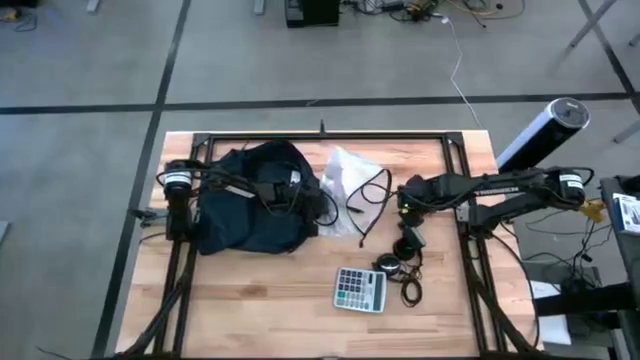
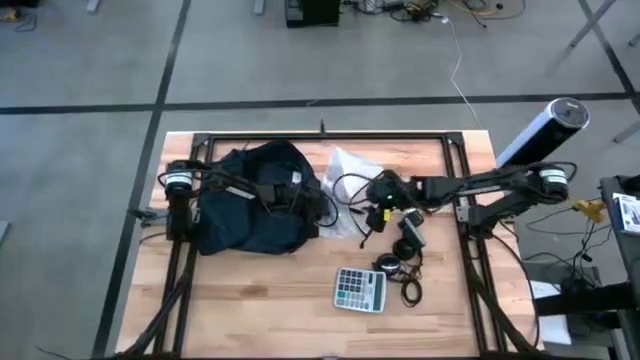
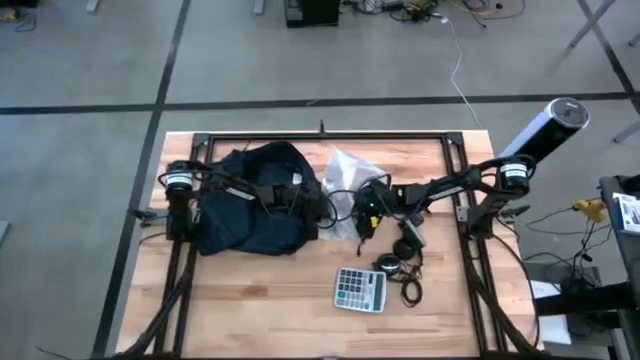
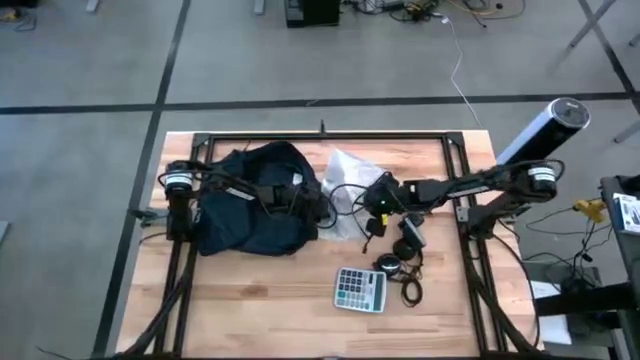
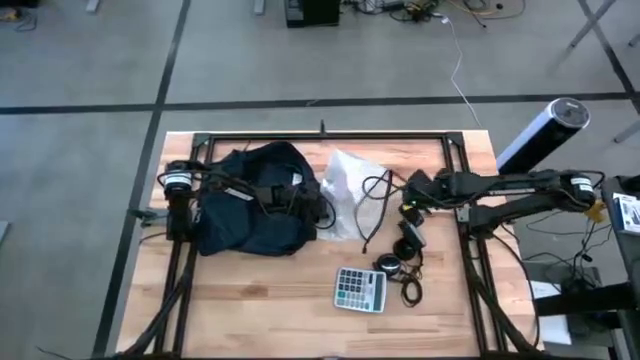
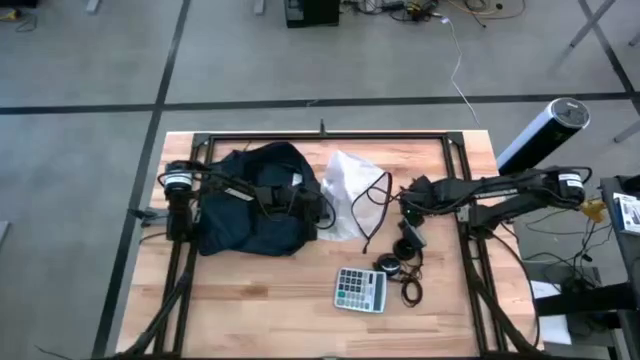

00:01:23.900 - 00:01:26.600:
Task: Unpack backpack
Remove the black pen from the white zipper pouch

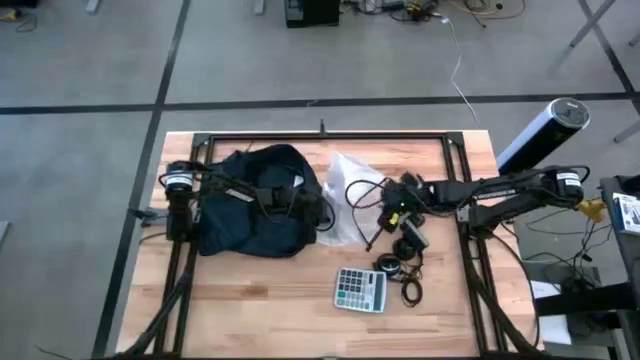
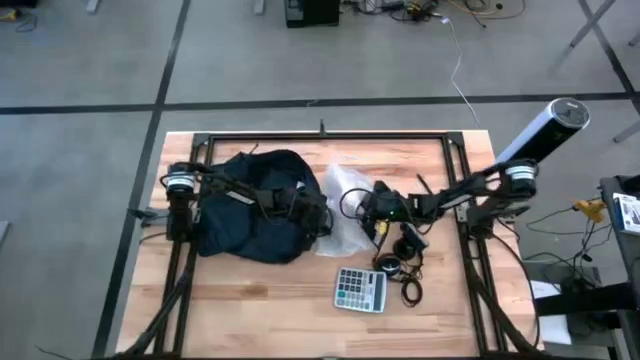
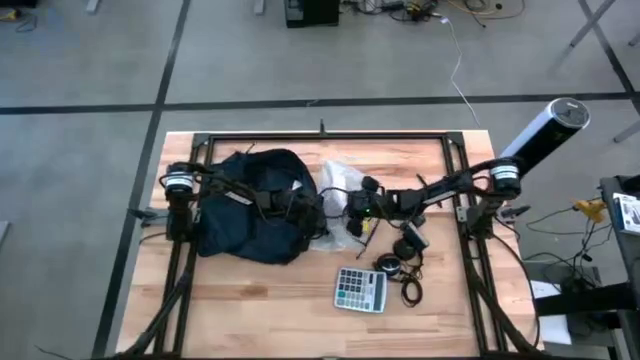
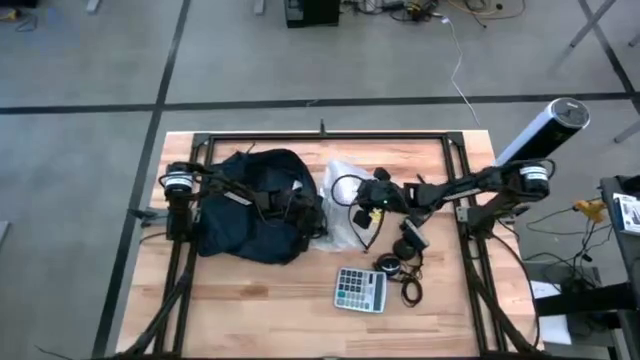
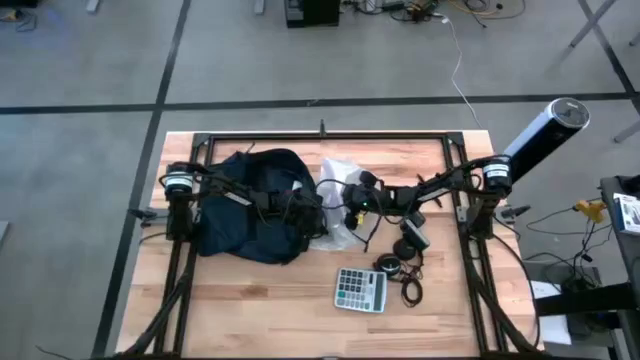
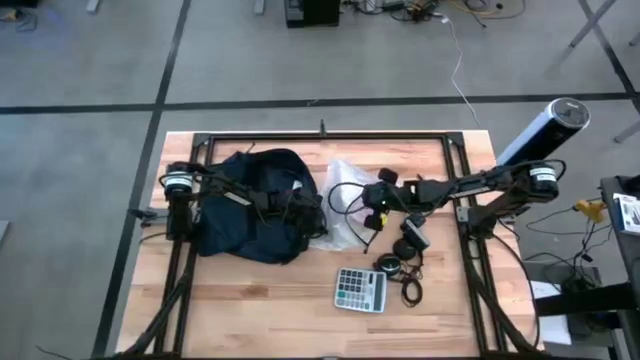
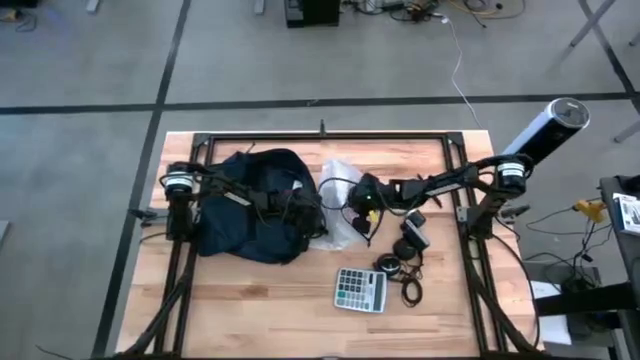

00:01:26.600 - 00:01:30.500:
Remove the red tuck box from the white zipper pouch

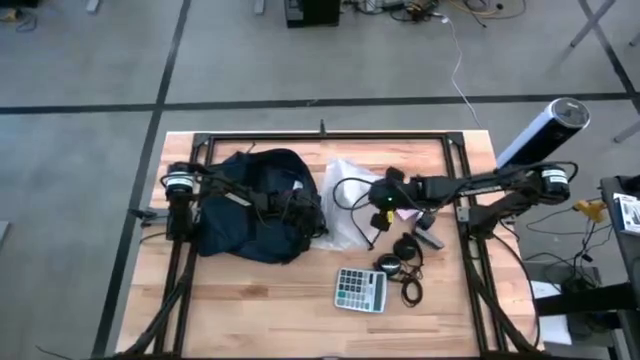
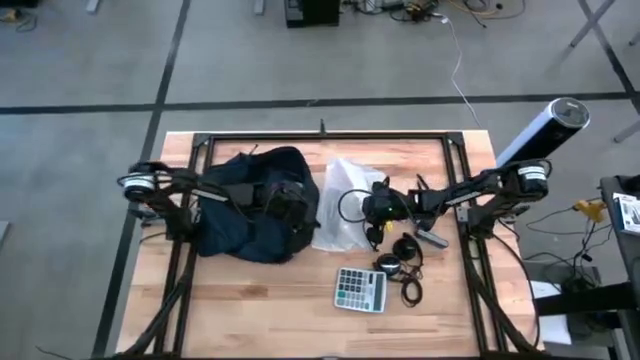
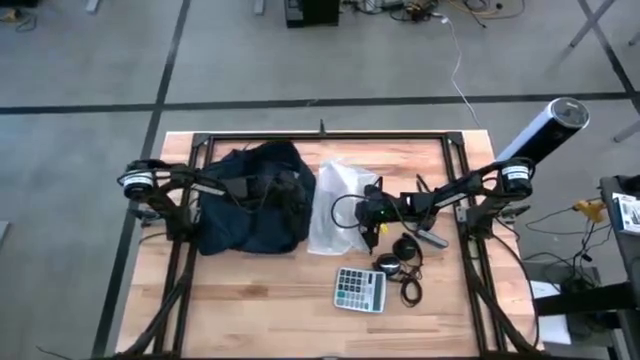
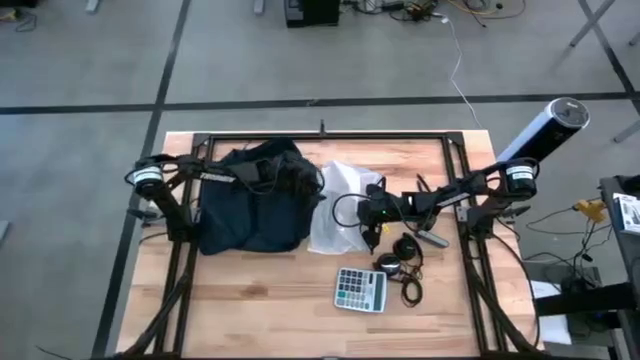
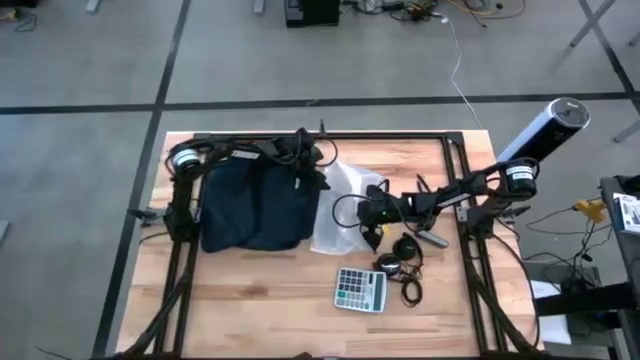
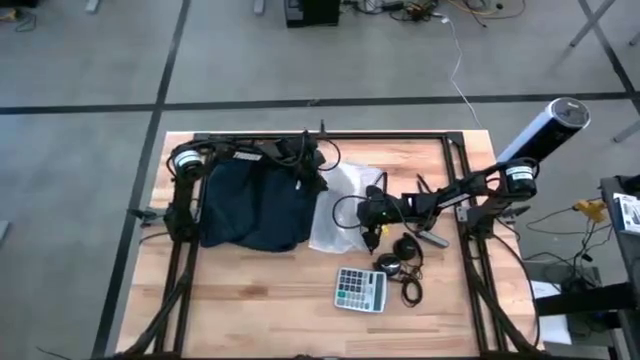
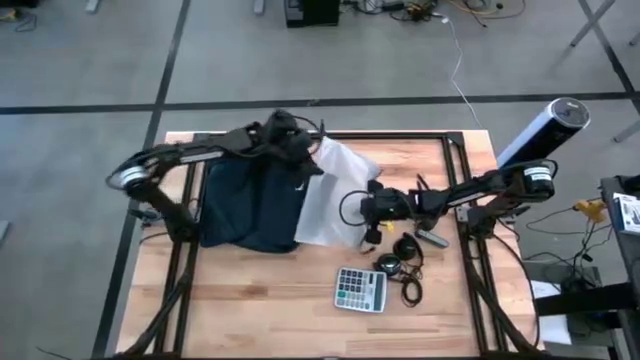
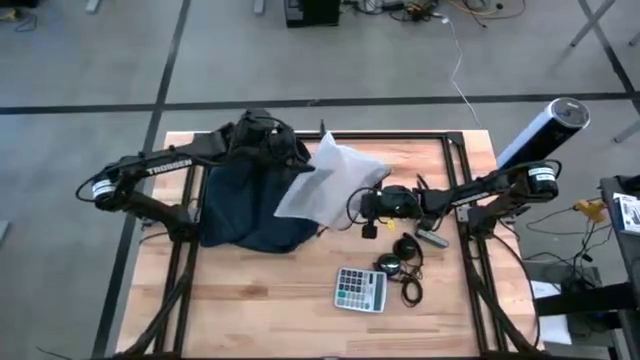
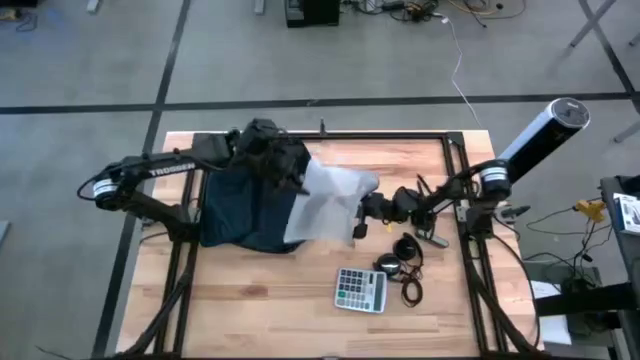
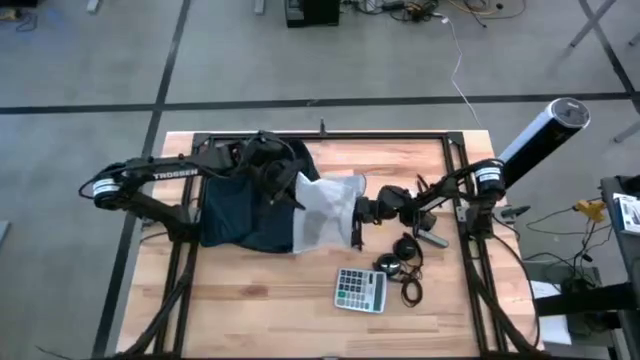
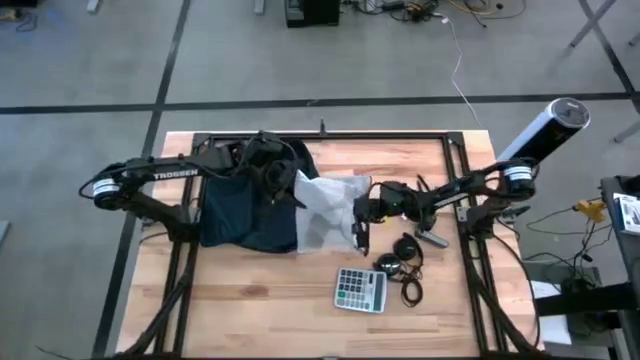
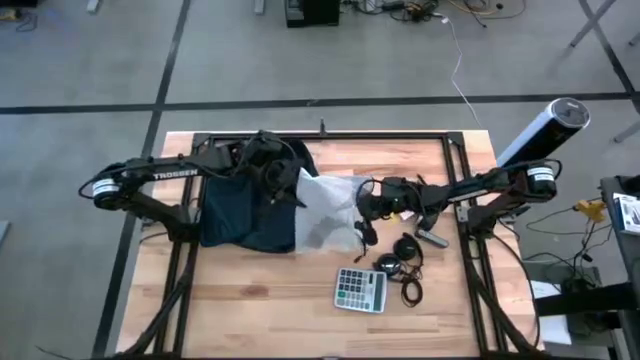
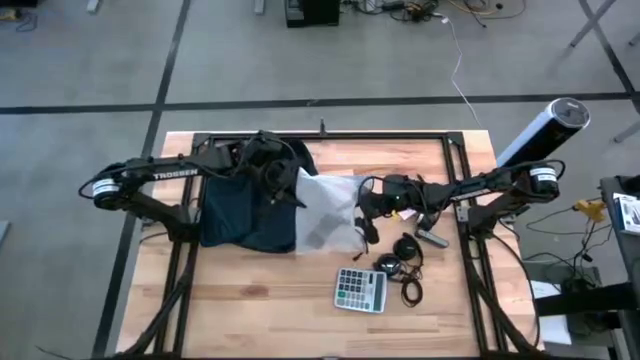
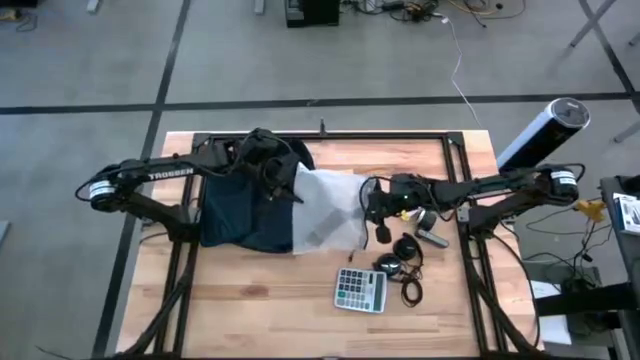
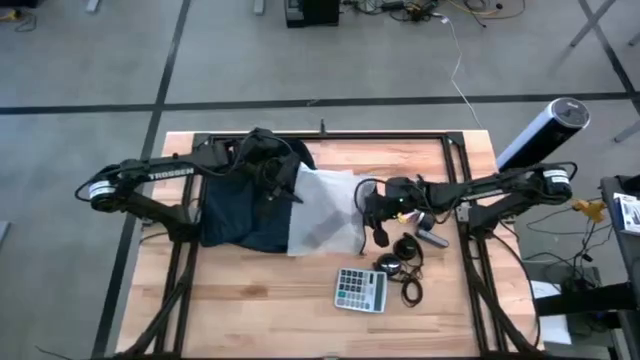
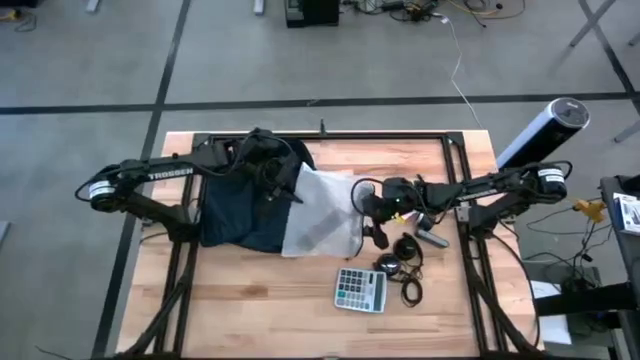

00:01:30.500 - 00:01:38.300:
Remove the black paper from the white zipper pouch

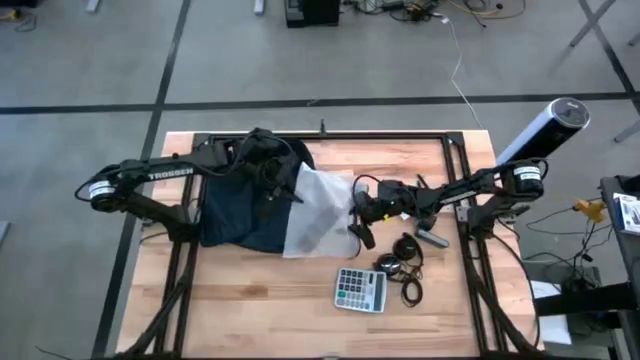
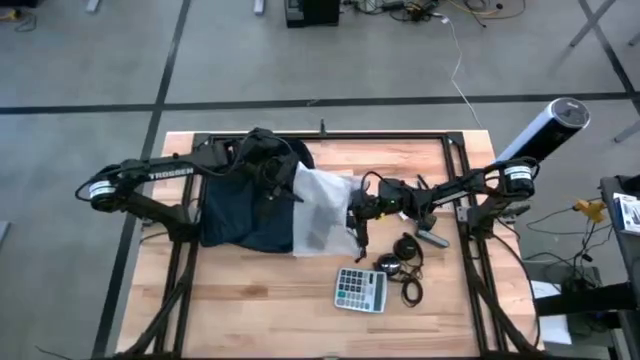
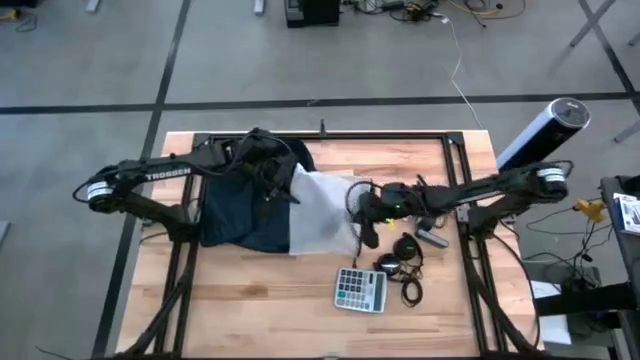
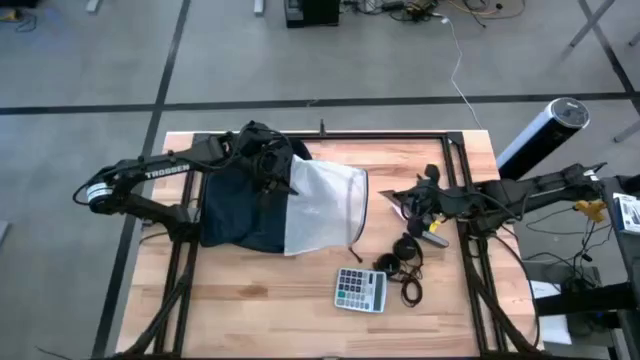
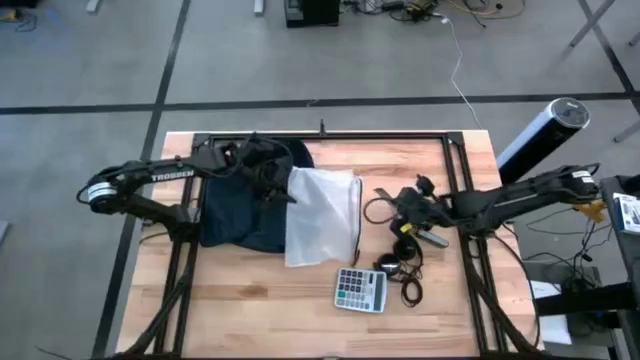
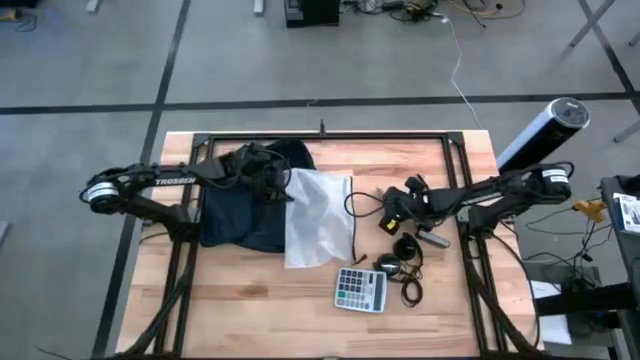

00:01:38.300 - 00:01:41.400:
Remove the black paper from the white zipper pouch

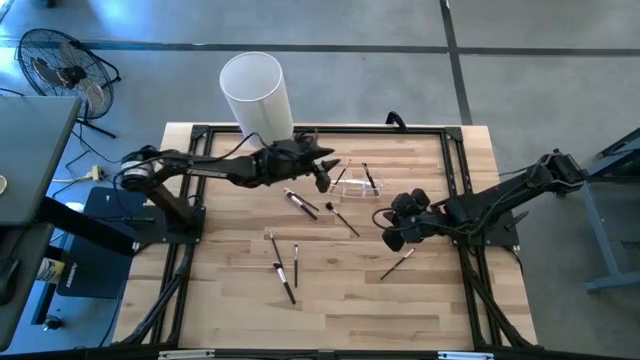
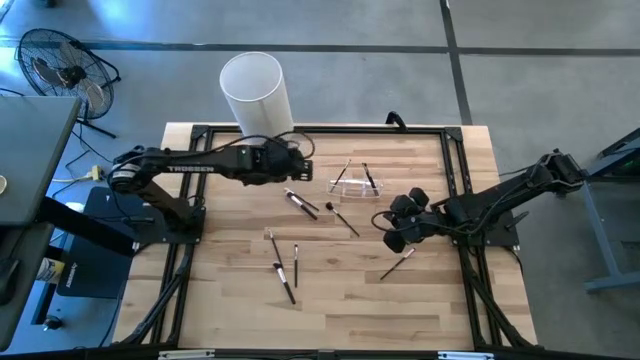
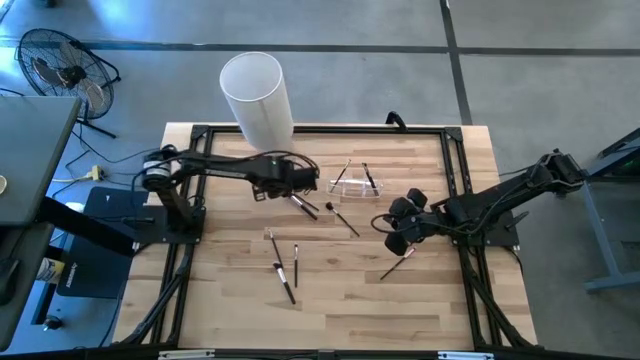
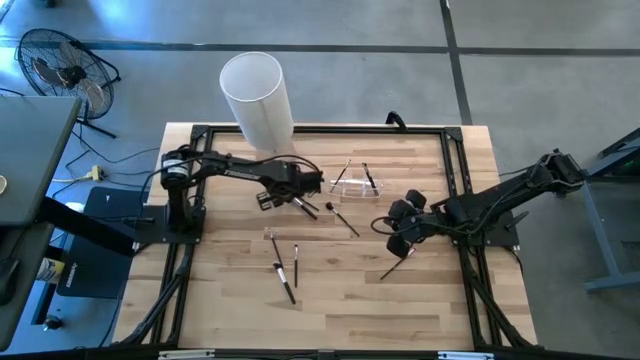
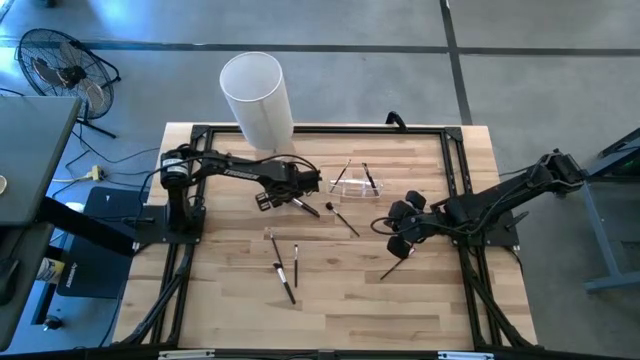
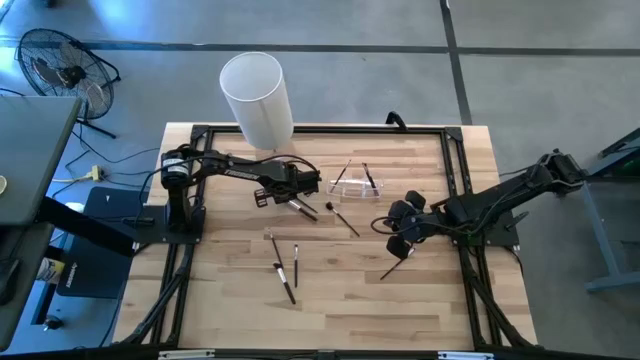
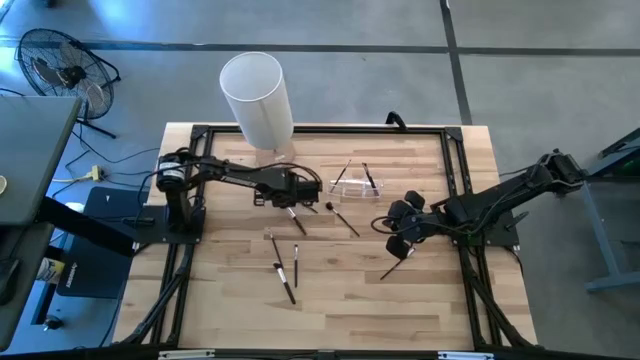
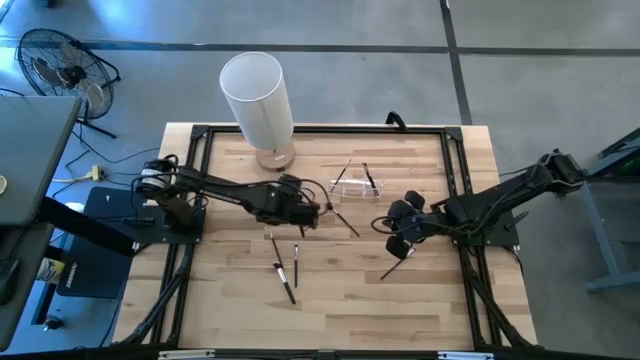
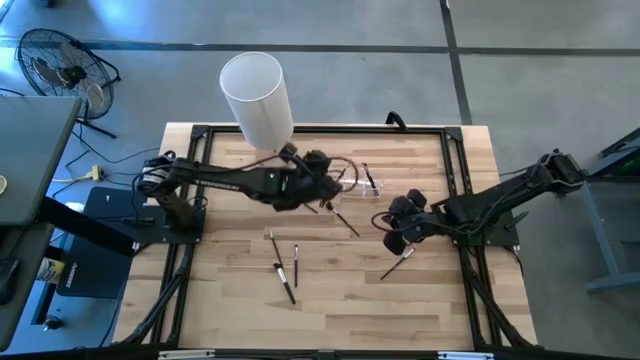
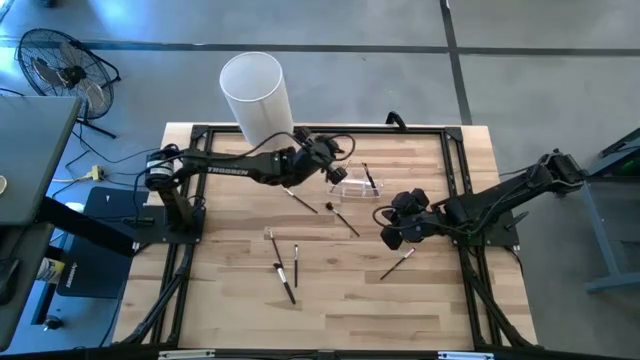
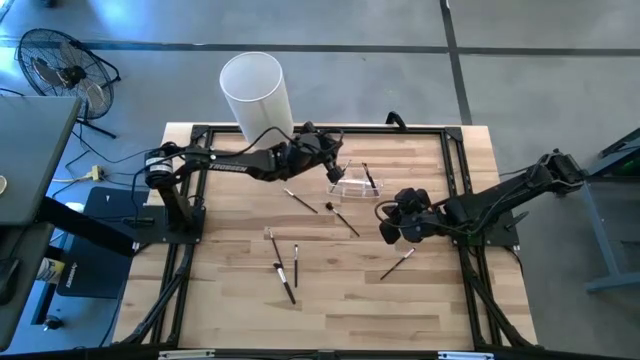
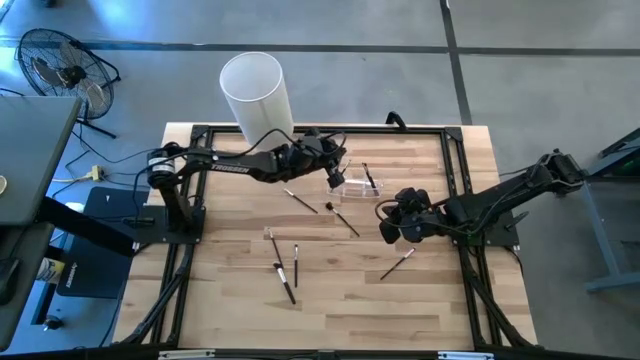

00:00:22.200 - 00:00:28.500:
Task: Put items in baskets/containers
Put the black blush brush into the transparent organizer
